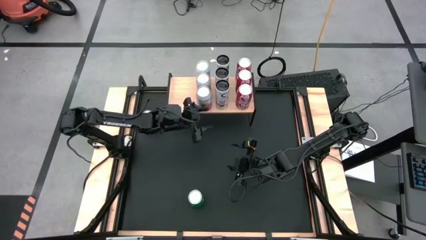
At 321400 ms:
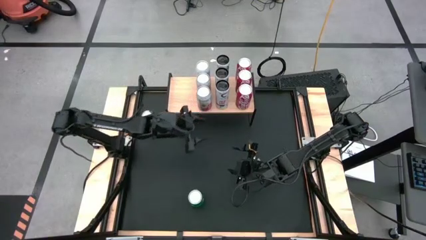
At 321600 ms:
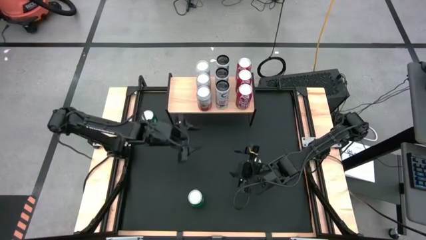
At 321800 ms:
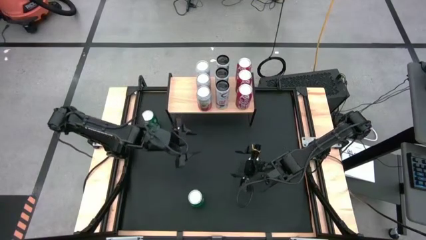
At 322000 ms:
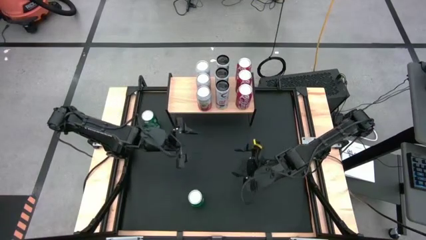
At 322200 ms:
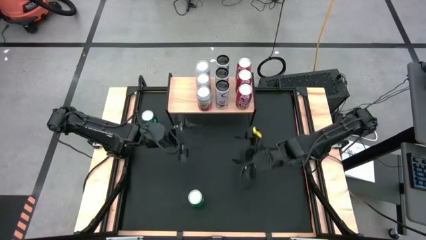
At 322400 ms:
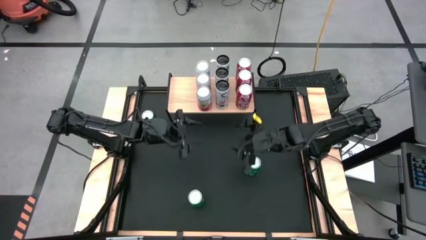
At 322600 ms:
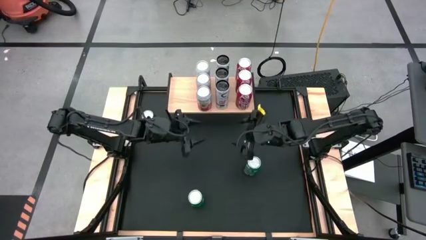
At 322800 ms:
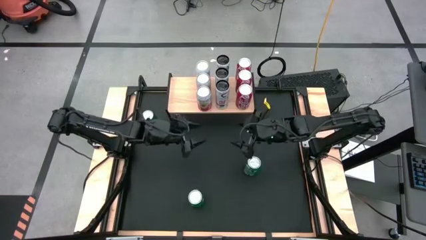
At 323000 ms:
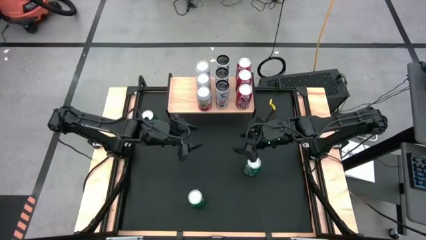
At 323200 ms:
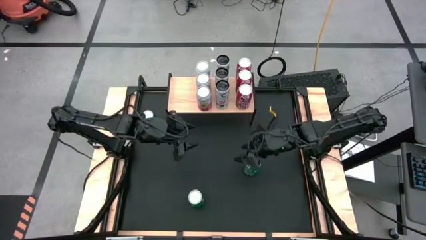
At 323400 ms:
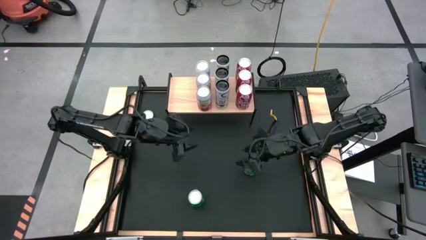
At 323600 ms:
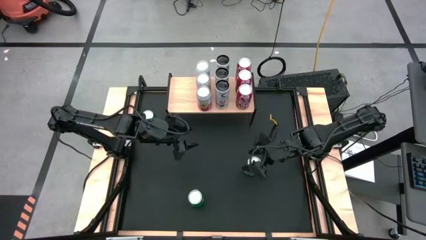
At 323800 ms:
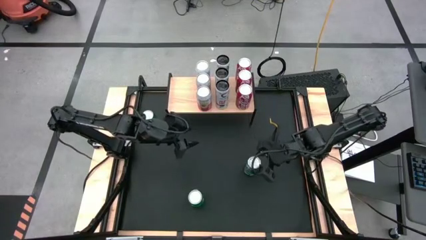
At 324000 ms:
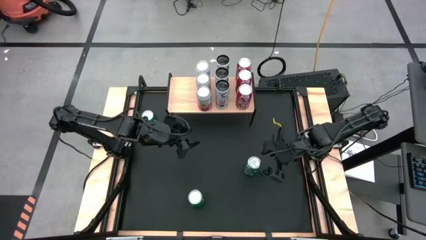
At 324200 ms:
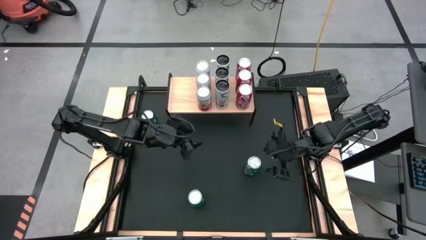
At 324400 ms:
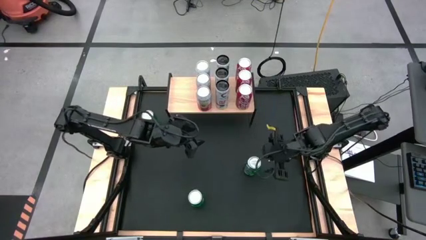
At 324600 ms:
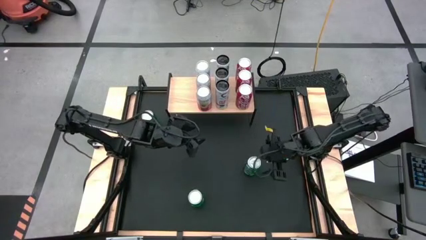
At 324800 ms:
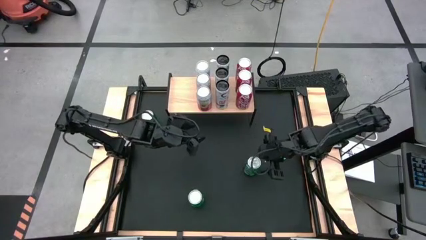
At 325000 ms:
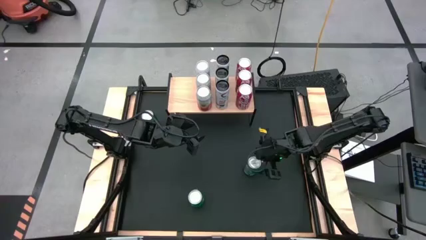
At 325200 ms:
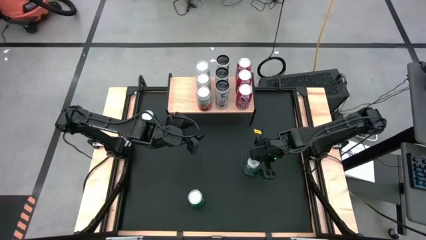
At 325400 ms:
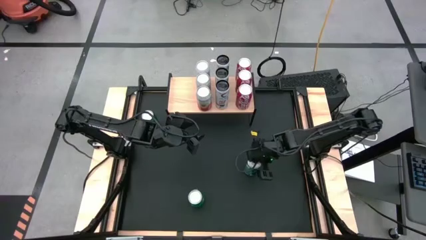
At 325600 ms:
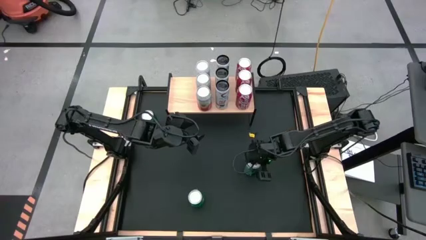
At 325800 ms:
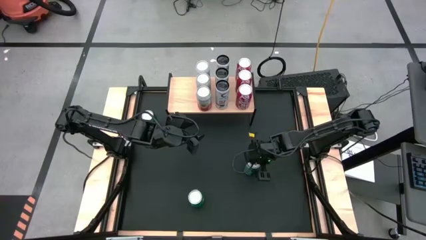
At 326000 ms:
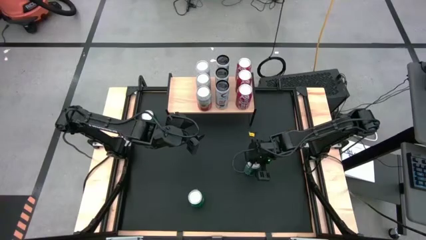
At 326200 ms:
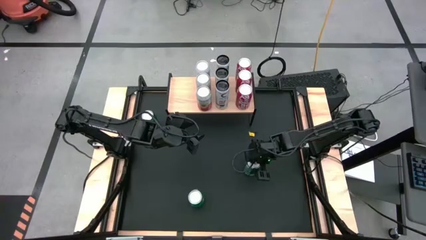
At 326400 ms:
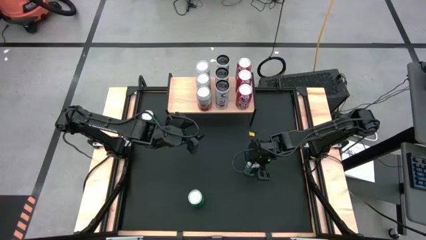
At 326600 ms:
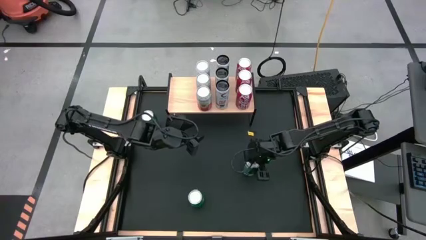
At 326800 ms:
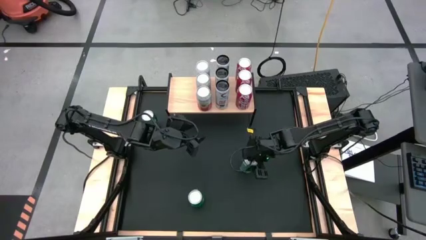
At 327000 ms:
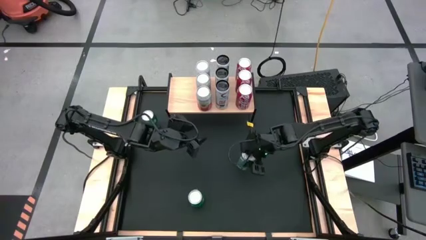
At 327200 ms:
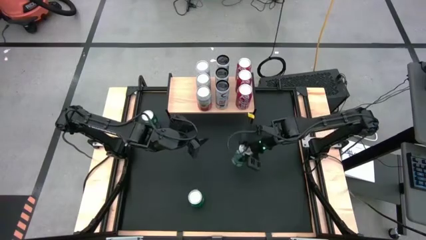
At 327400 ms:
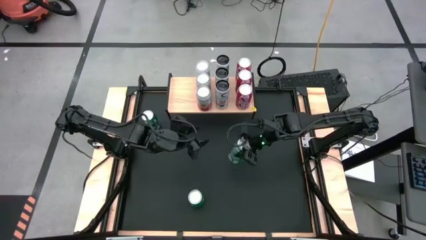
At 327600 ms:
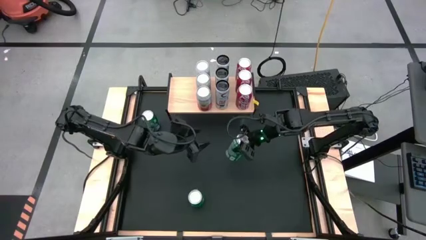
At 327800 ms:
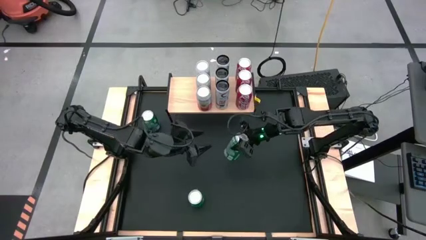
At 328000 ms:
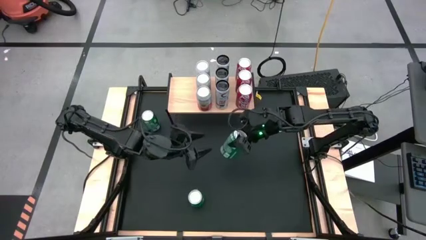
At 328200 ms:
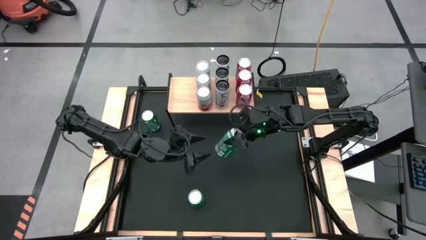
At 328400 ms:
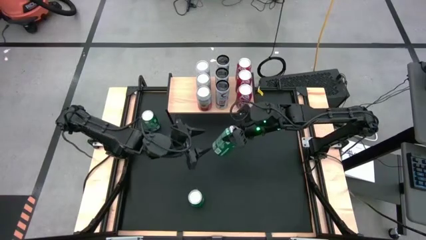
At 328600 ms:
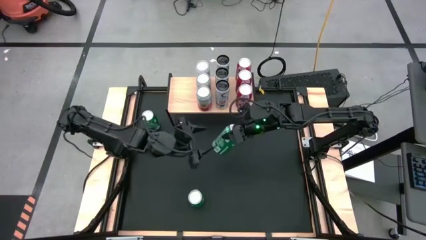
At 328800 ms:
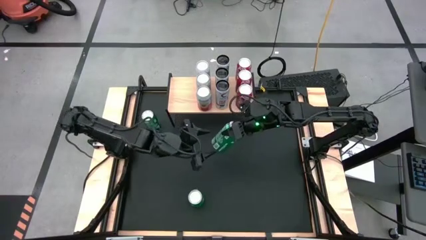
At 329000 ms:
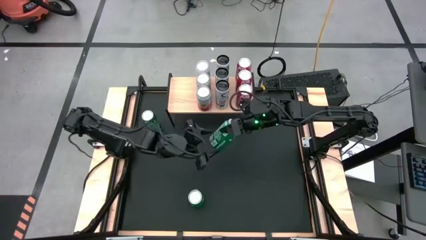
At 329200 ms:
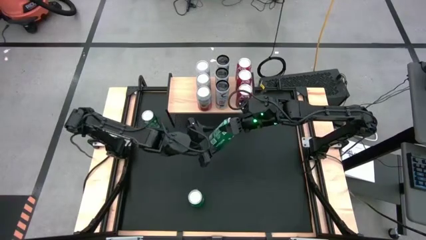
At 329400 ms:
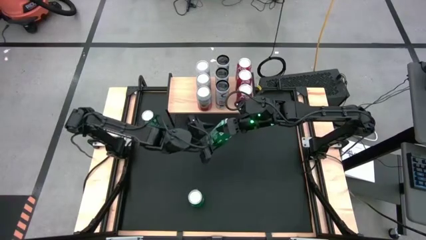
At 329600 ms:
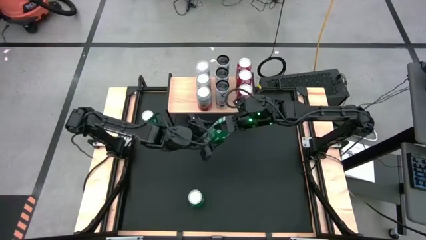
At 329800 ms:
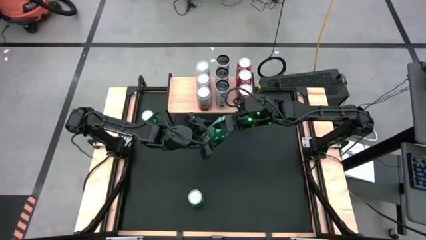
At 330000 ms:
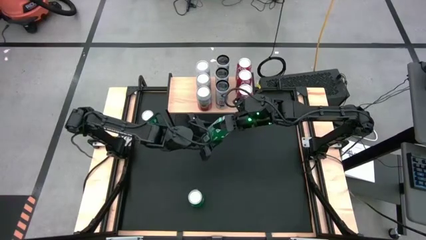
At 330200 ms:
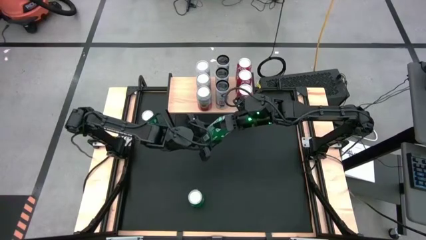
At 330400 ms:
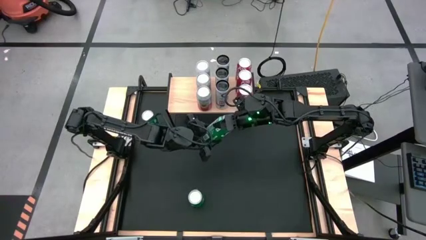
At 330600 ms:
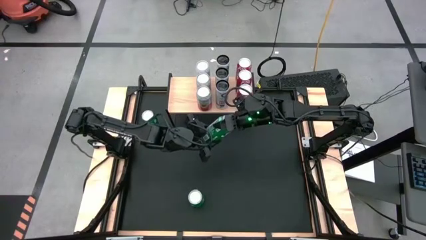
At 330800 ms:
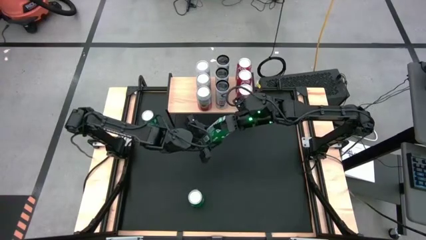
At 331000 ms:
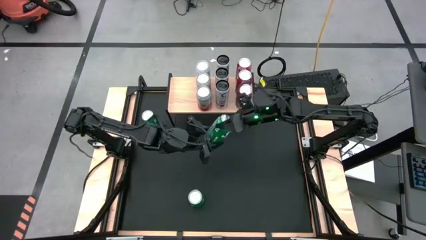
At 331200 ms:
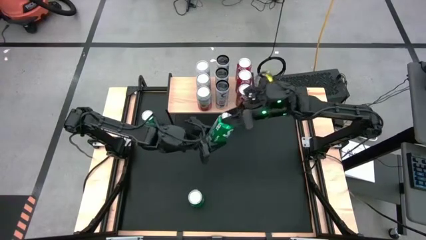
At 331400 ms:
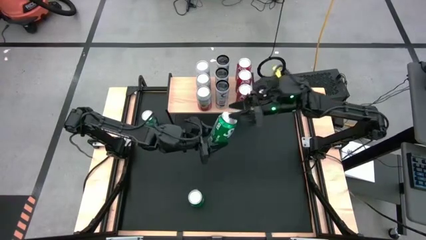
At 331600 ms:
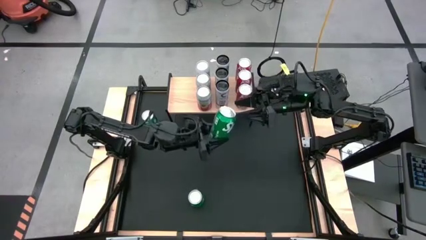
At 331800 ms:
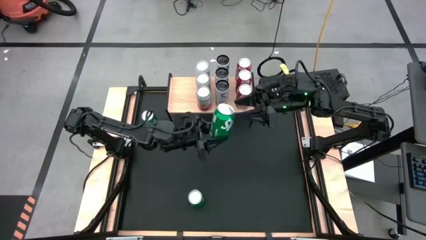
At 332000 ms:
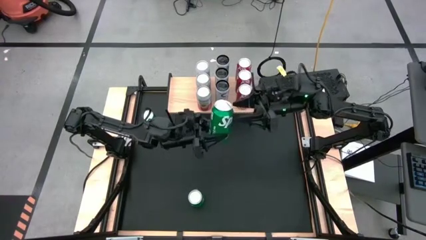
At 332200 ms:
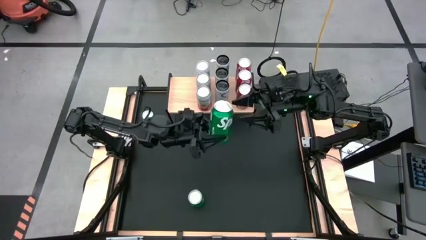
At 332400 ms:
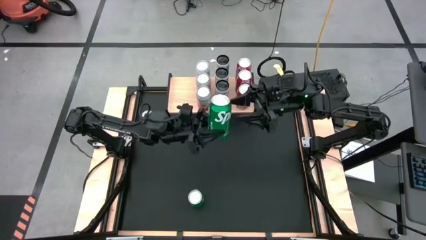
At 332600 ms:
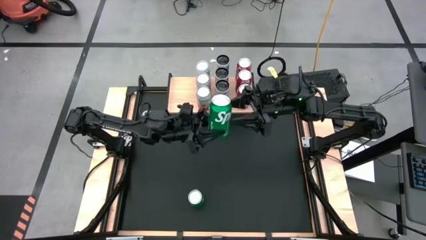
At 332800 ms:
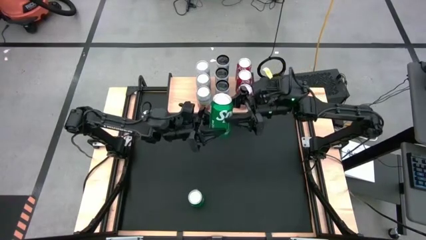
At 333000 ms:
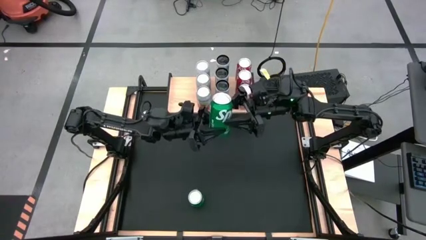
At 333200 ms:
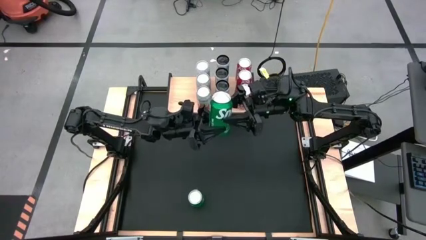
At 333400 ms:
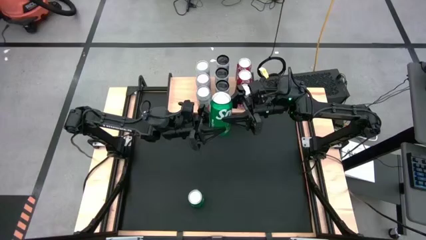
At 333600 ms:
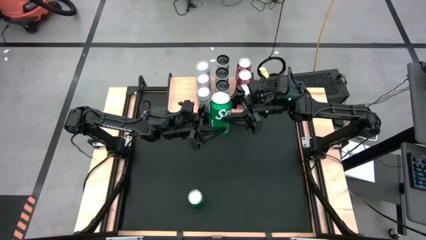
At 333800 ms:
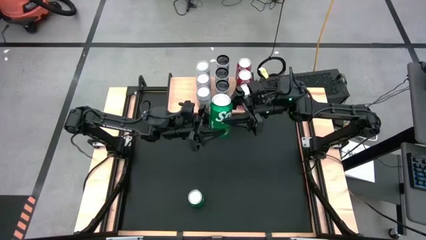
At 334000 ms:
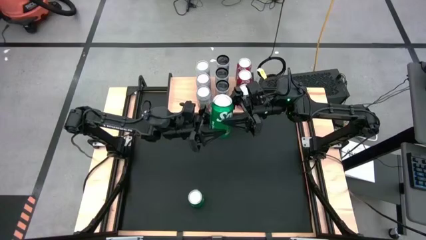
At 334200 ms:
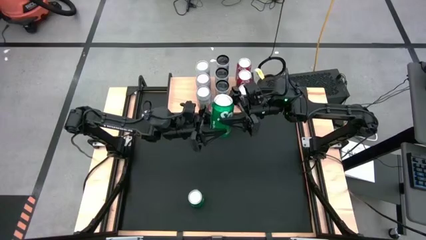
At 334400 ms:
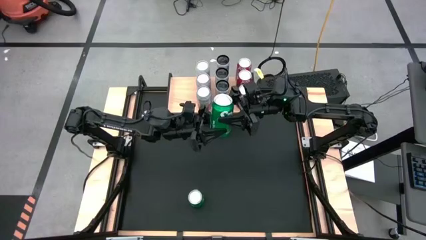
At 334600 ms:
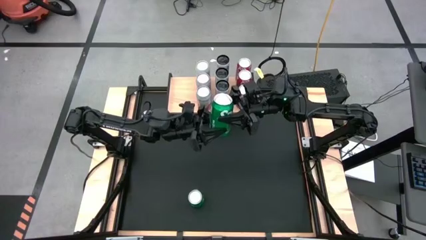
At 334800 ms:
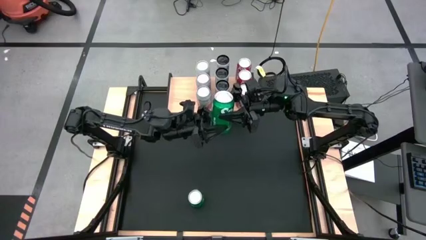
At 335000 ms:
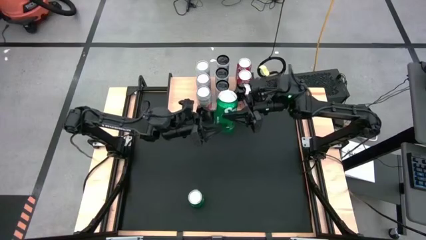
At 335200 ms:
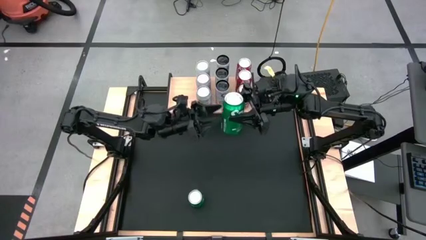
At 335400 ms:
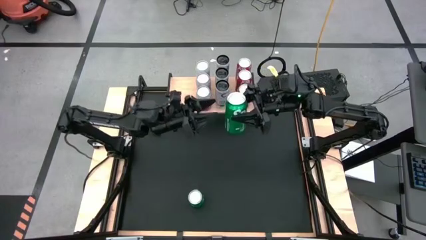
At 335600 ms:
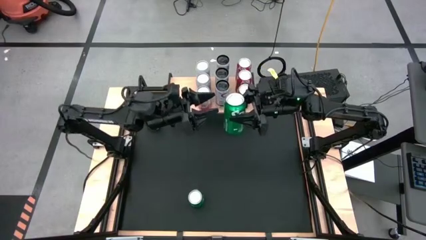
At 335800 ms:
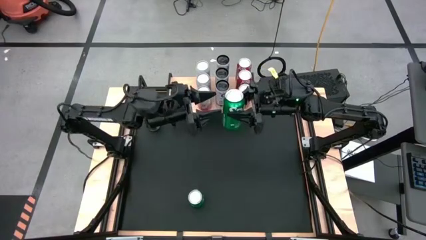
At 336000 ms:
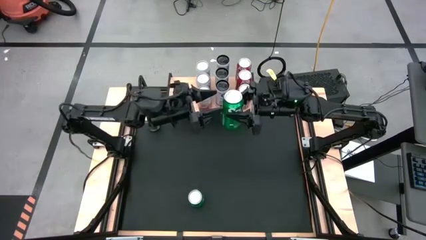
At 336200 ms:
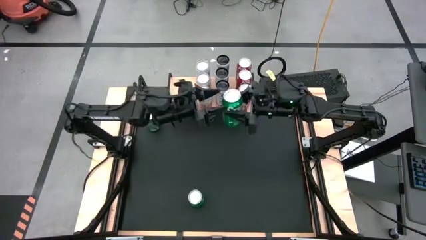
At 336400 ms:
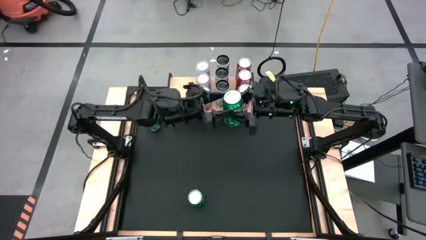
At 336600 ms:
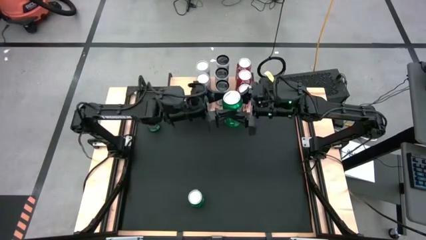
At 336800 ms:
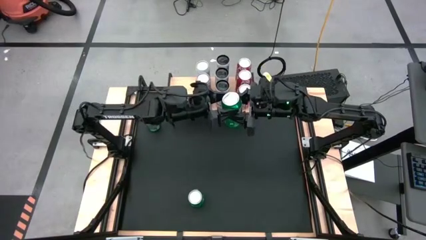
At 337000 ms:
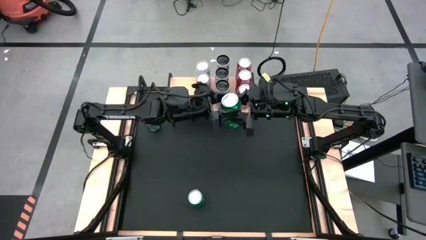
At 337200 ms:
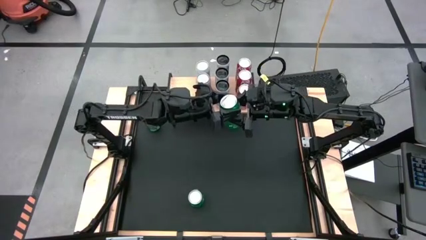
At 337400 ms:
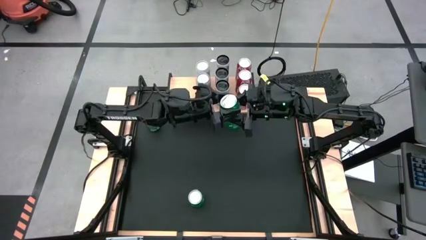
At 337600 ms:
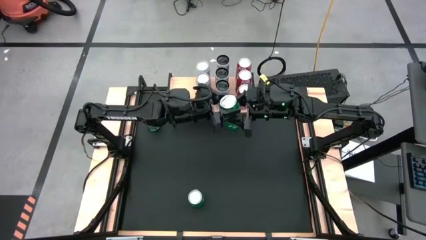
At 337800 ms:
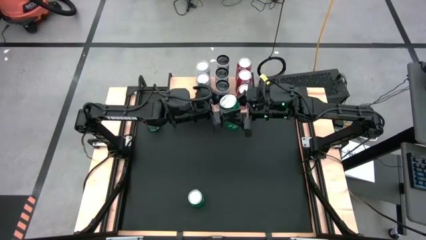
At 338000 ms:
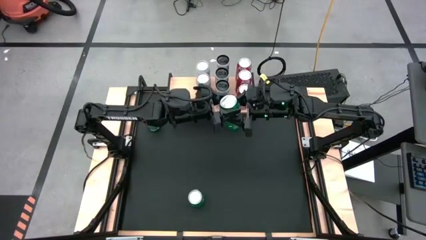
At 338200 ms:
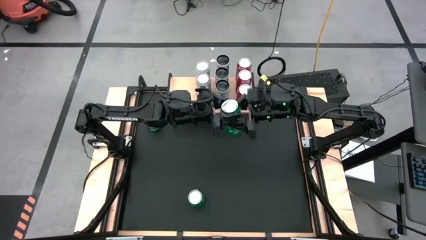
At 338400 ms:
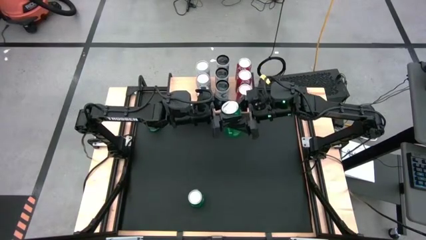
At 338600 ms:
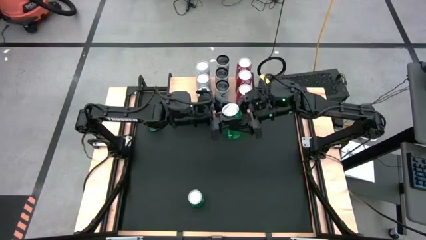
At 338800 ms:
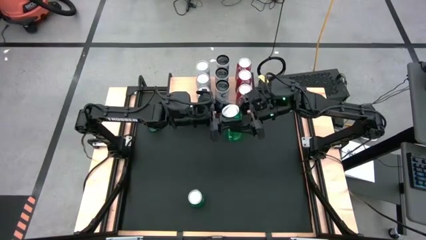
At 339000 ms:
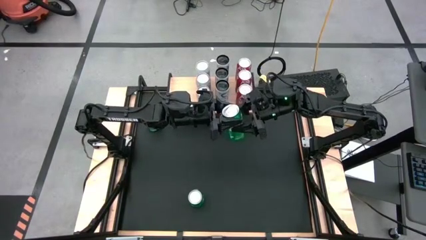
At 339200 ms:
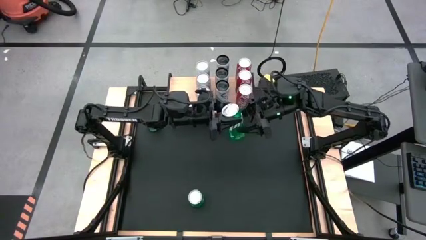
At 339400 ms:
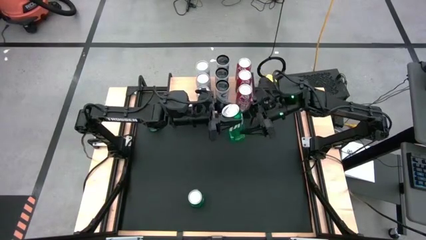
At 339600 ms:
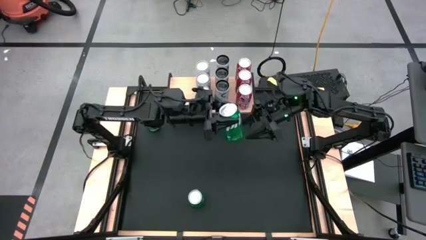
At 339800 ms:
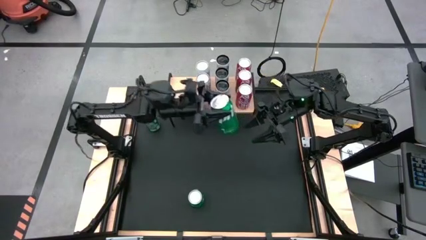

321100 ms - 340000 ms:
Task: Place canned beverage on shelf
Put the middle green soda can on the shelf
